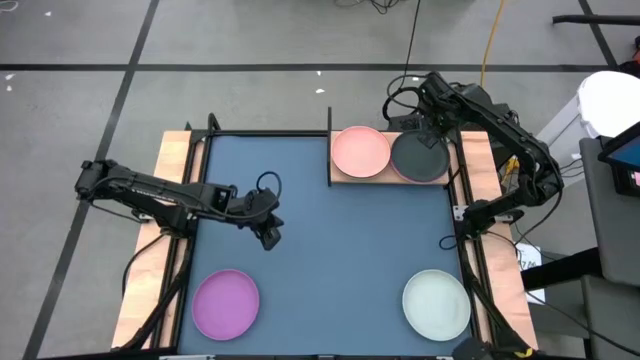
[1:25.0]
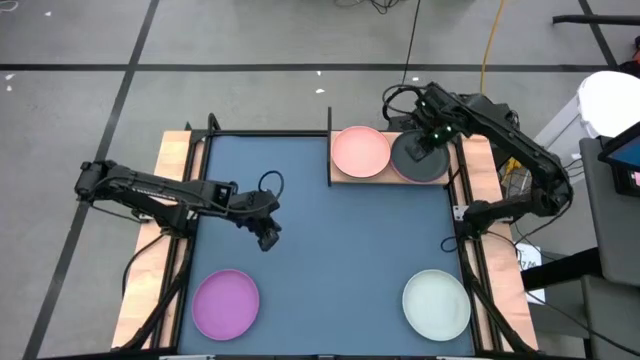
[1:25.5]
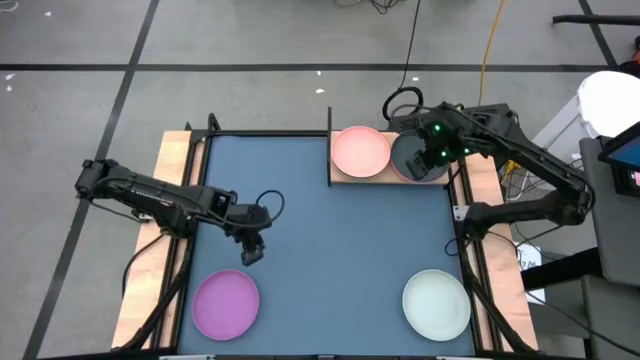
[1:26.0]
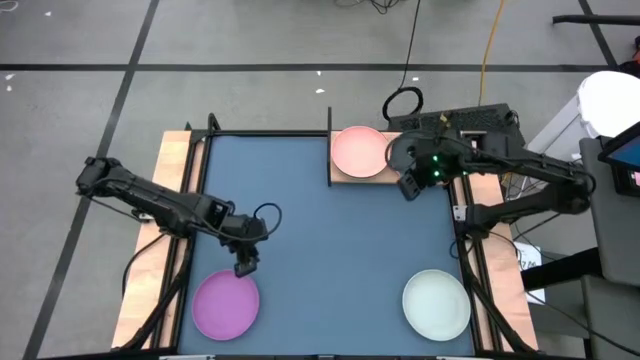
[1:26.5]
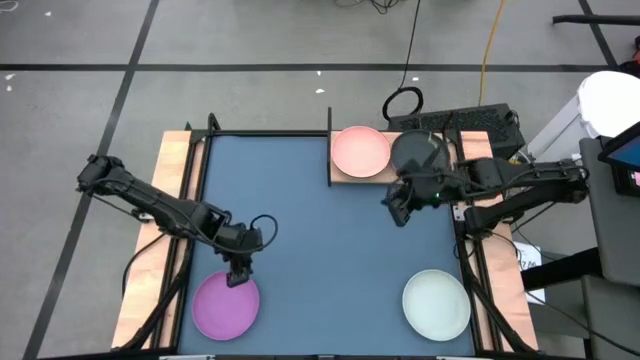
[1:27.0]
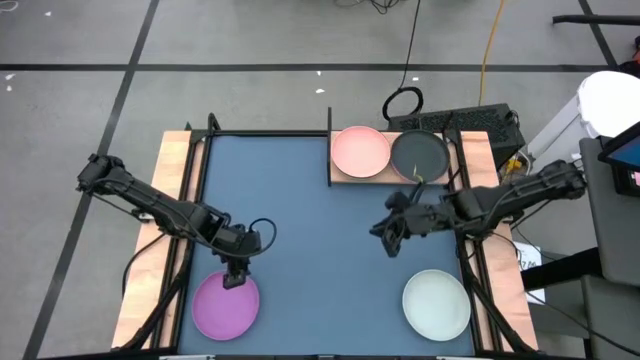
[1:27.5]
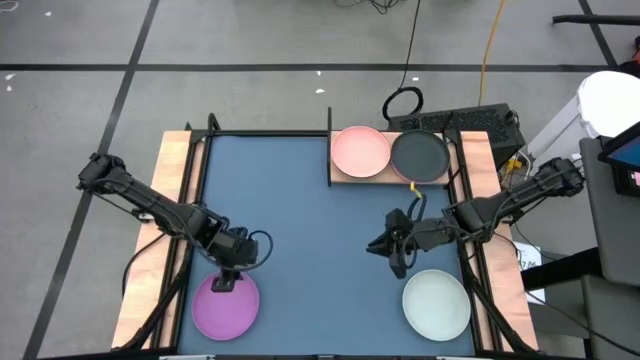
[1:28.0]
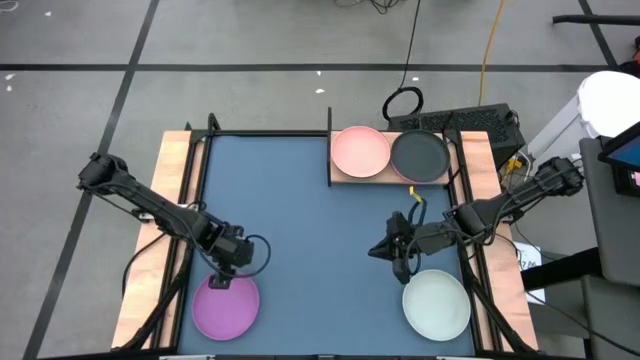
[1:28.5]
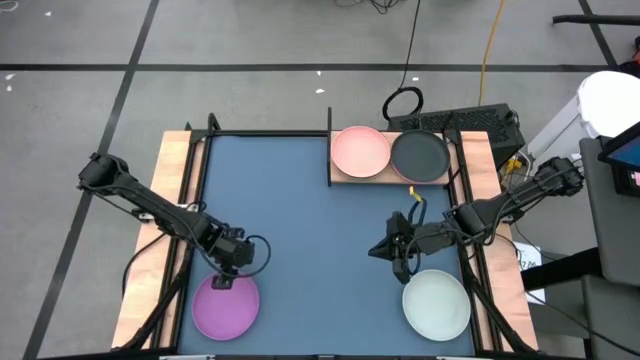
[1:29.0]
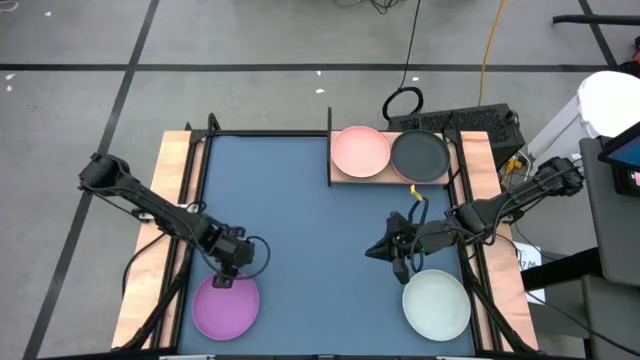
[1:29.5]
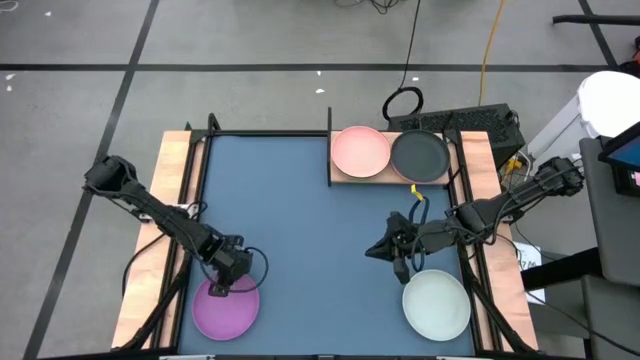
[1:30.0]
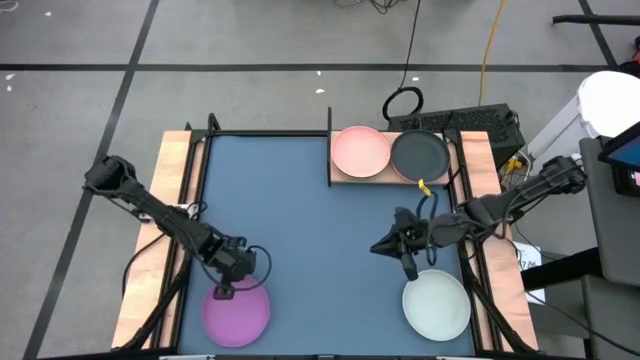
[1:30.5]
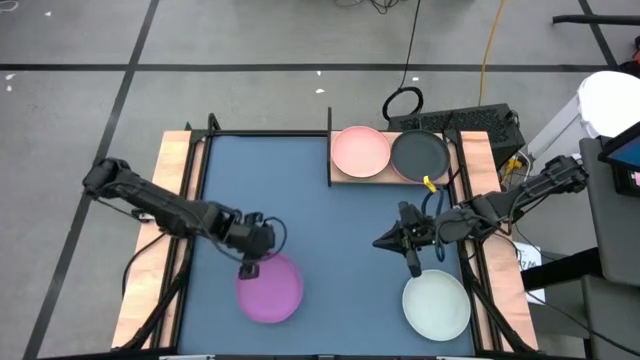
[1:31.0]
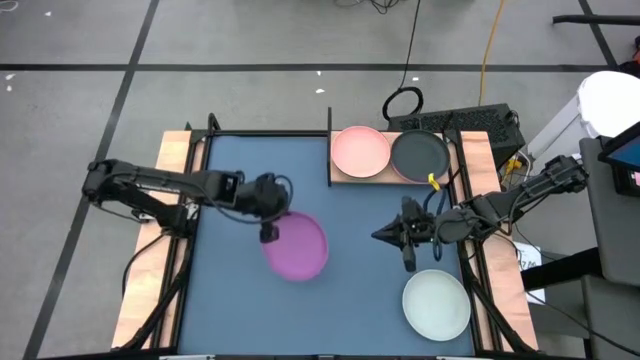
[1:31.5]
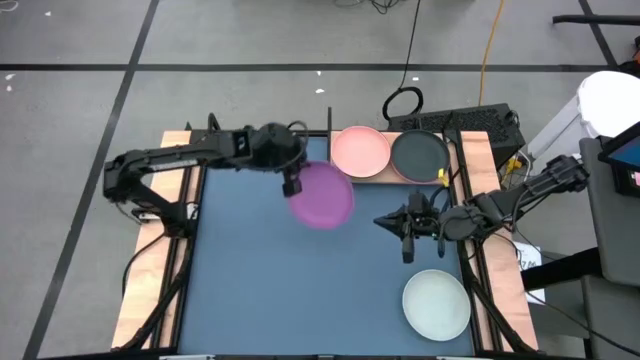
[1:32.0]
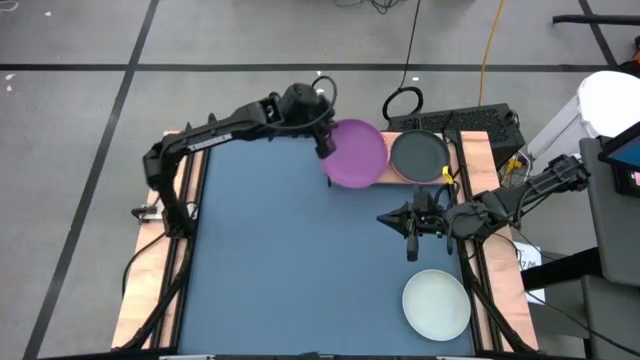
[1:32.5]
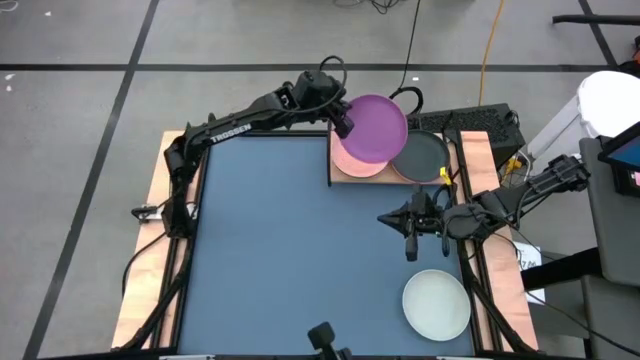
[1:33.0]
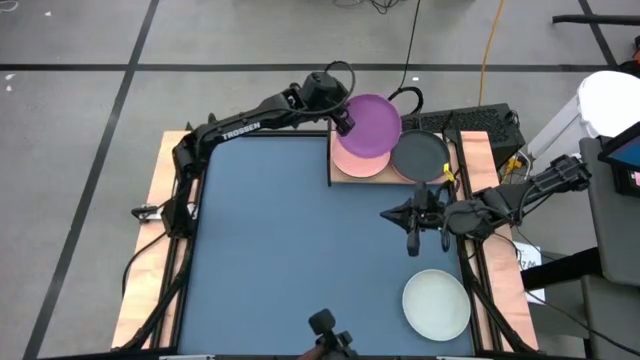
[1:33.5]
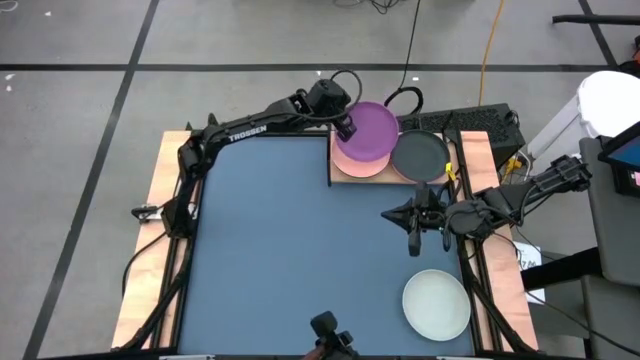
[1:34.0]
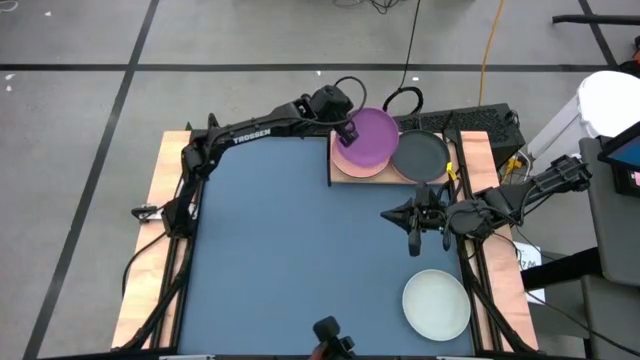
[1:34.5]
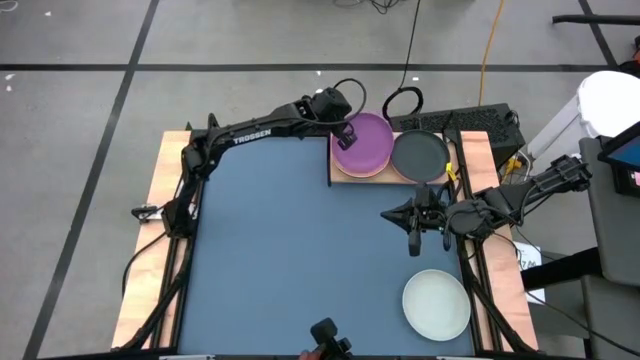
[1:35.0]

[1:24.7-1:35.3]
Task: Place and stack plates onto a shelf
Stack the purple plate on top of the orange plate on the shelf

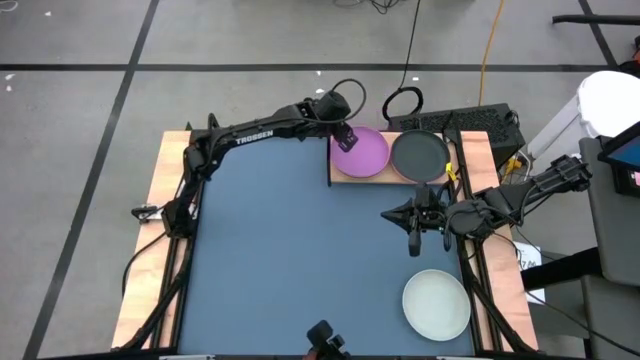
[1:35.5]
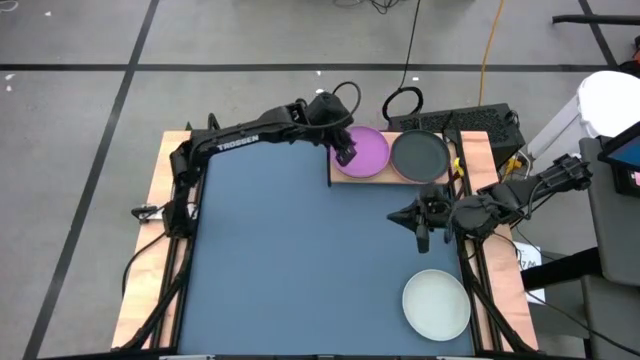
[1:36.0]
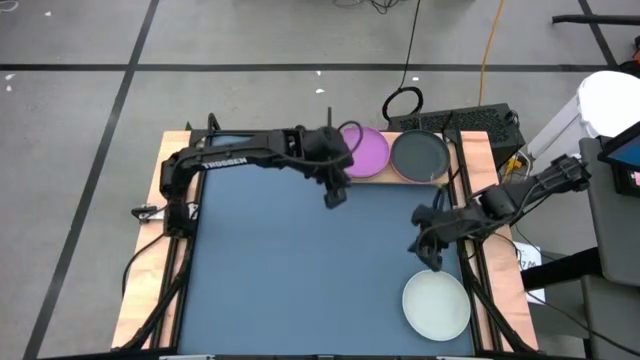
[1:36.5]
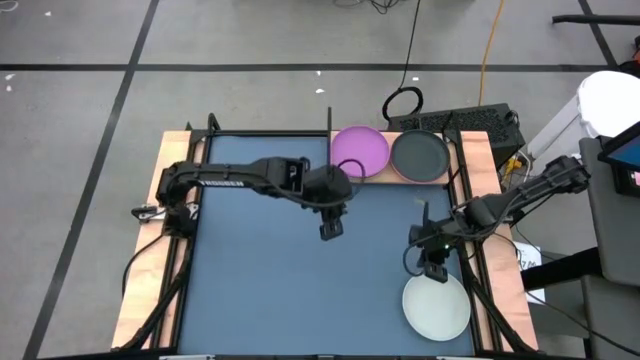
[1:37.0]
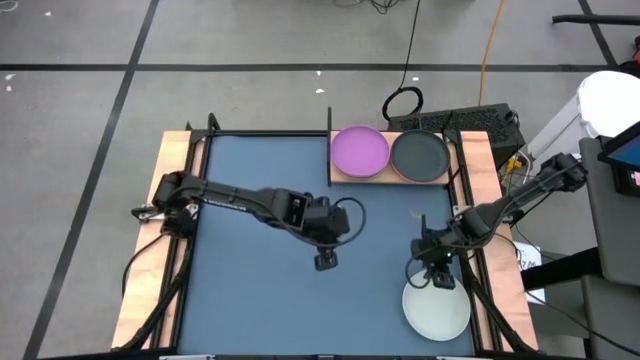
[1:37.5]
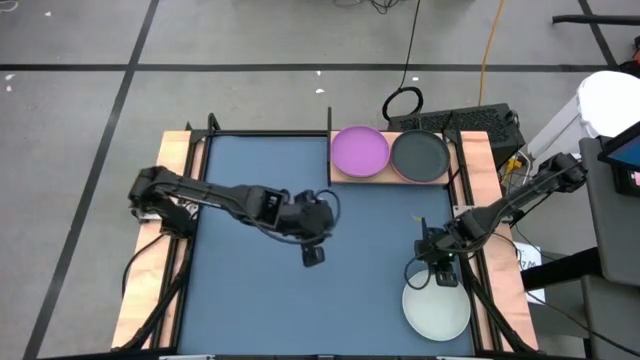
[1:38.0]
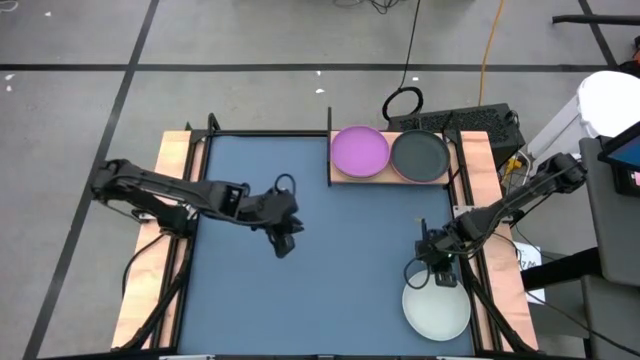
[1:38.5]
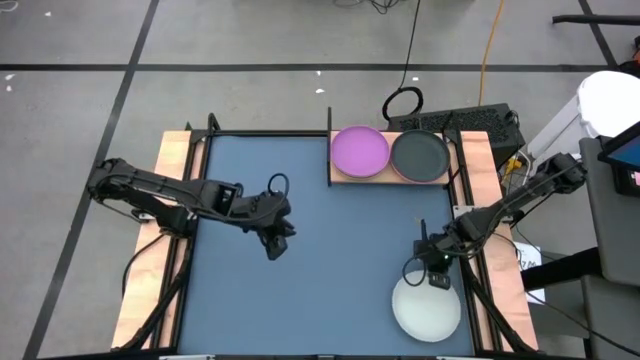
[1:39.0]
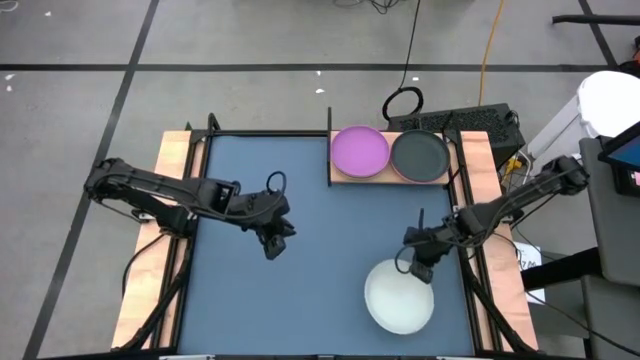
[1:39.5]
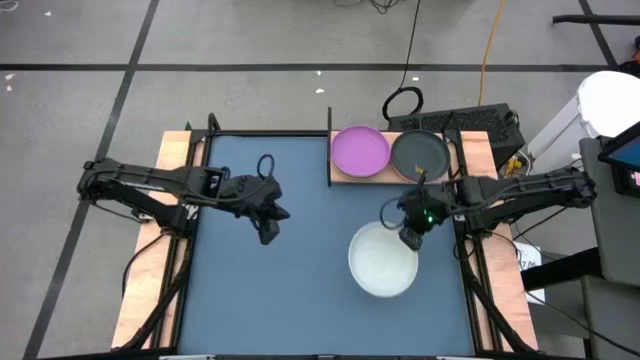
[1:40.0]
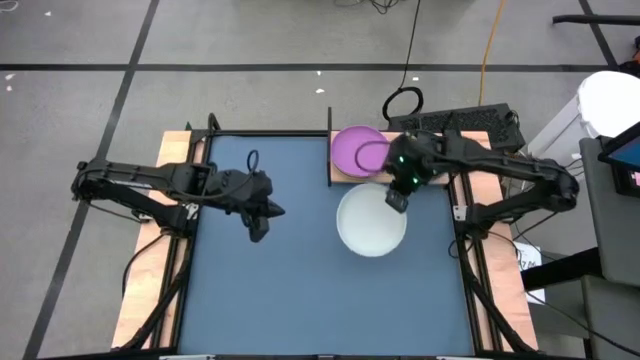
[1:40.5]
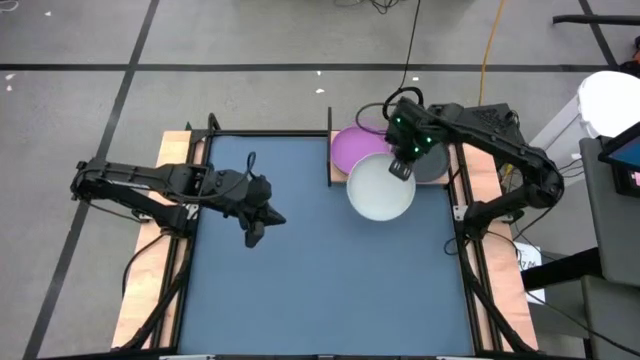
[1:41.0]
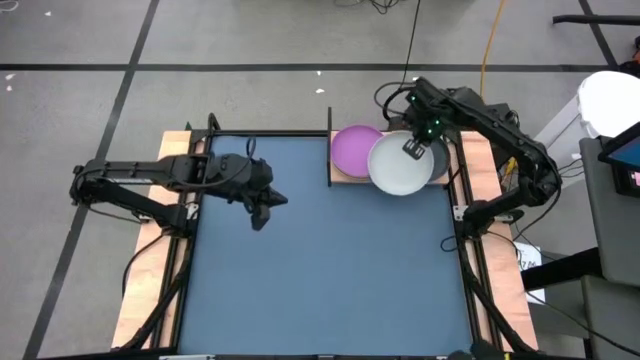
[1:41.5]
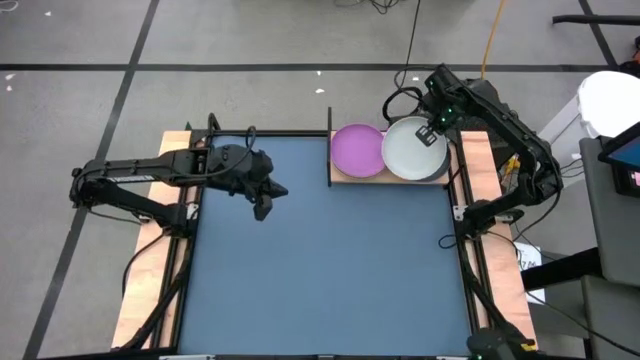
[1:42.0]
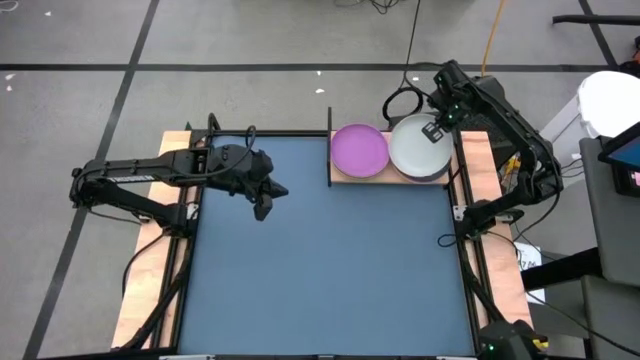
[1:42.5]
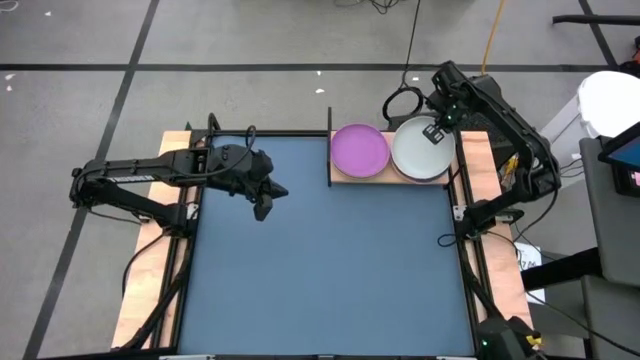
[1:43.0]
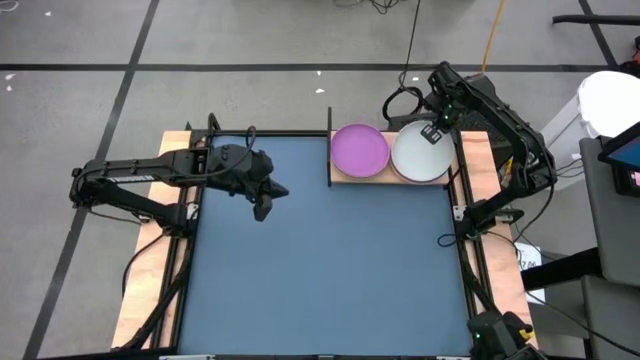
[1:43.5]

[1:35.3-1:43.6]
Stack the gray plate on top of the black plate on the shelf

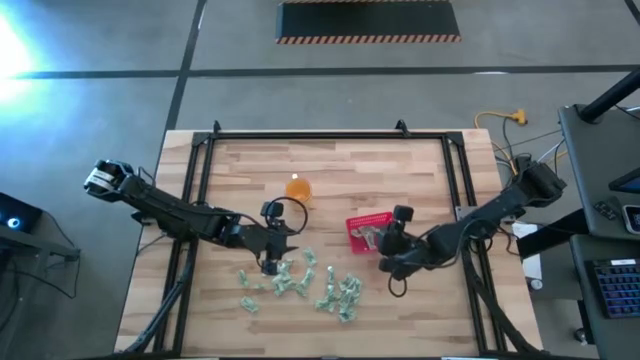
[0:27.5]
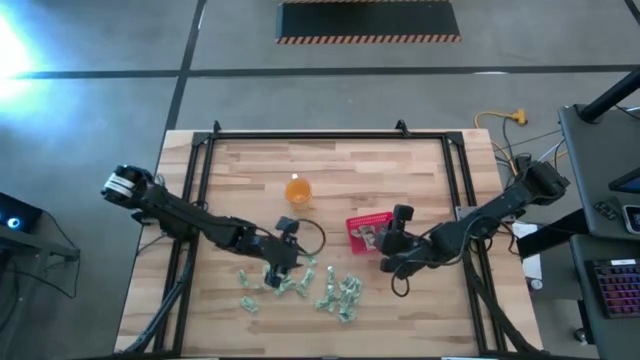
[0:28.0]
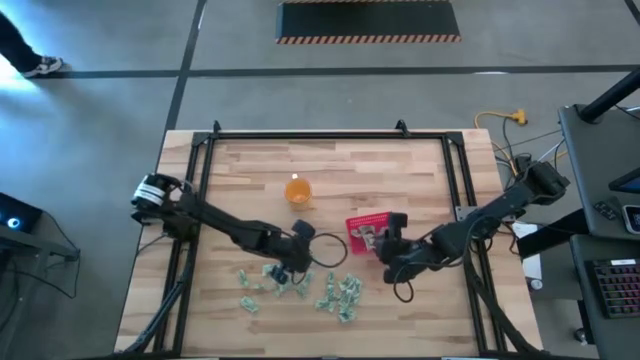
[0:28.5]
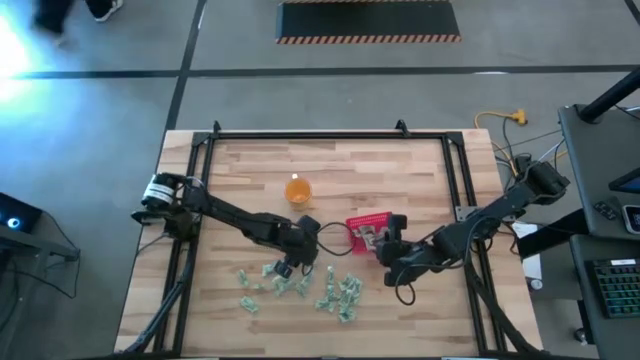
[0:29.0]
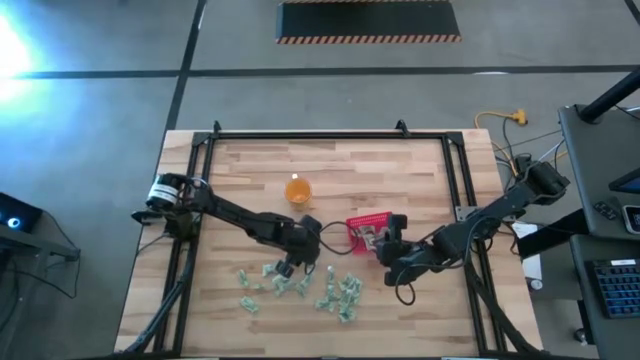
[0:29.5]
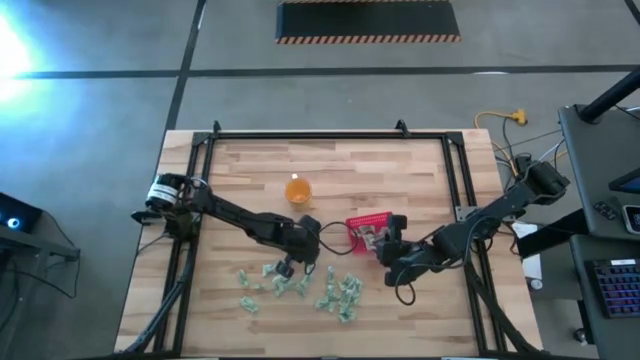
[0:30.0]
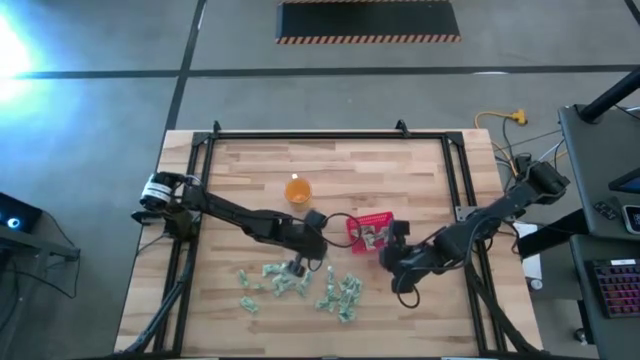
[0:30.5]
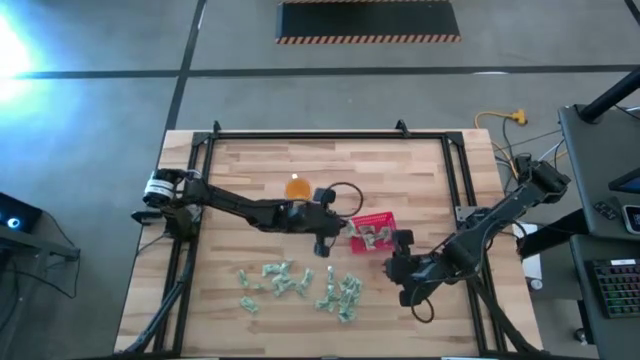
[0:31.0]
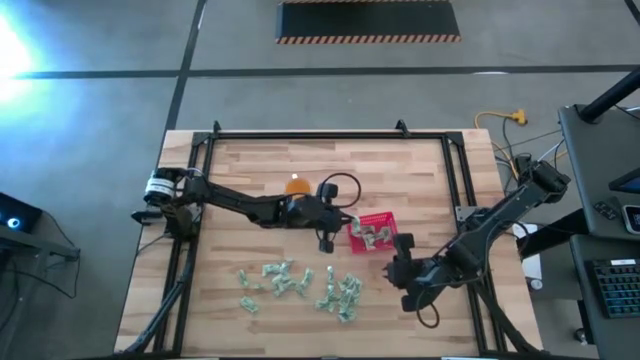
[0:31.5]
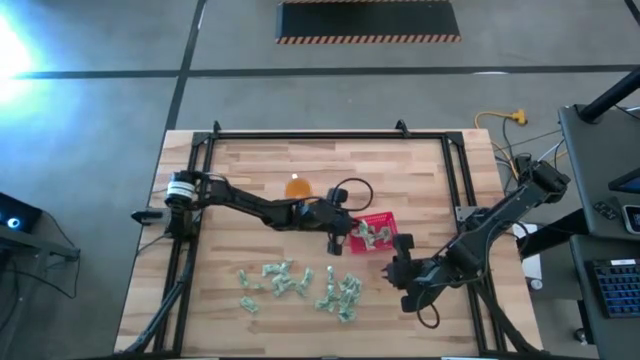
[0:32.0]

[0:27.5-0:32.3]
Task: Pick and place Stevia / Truvia into bins
Put the stevia packet into the basket
